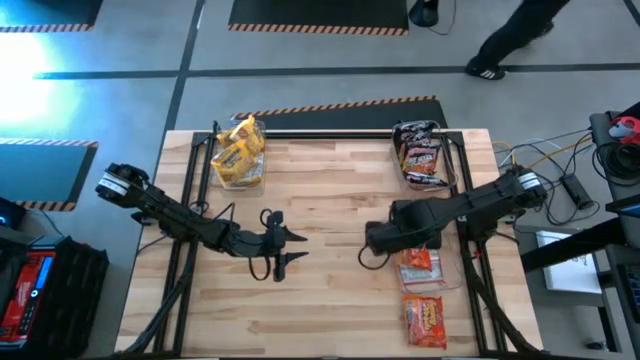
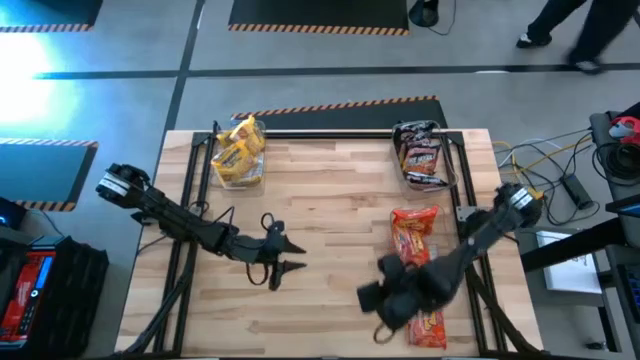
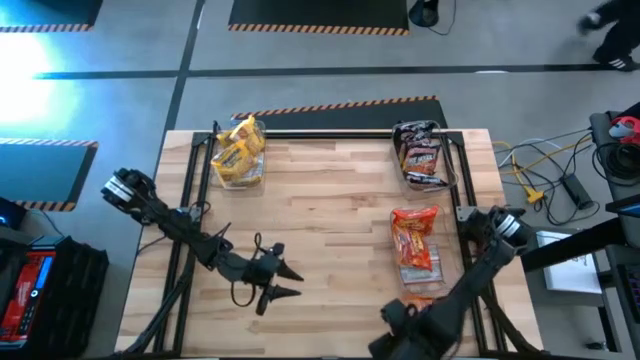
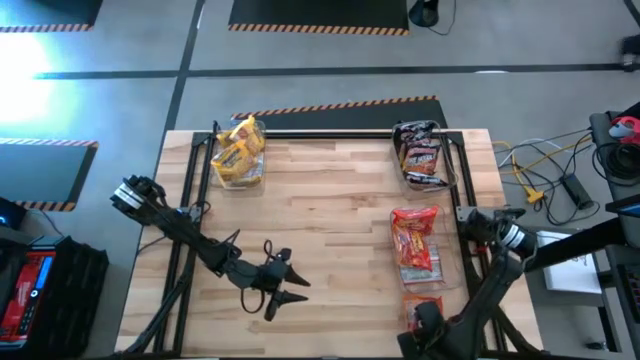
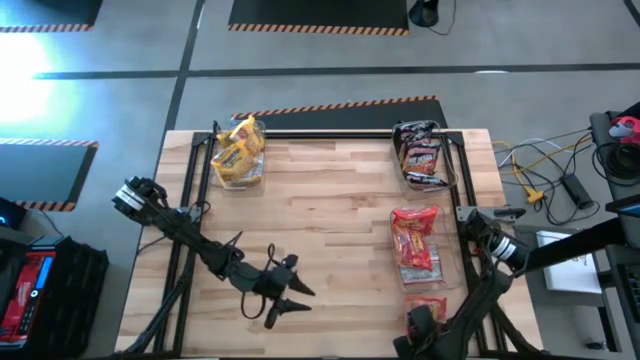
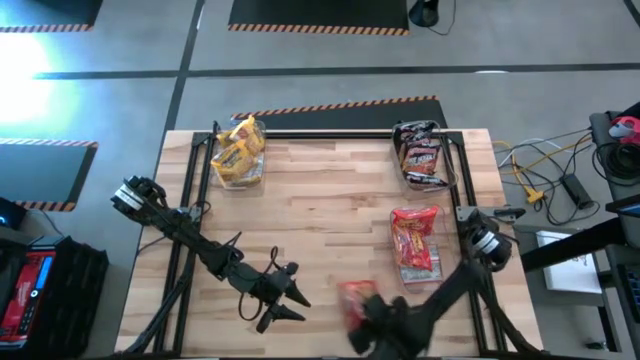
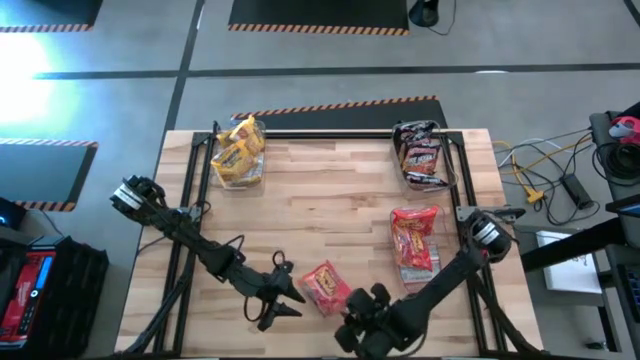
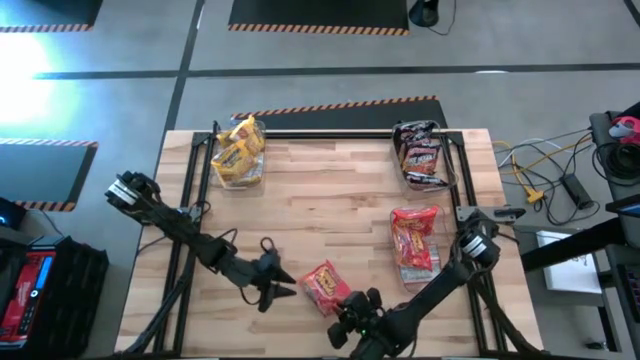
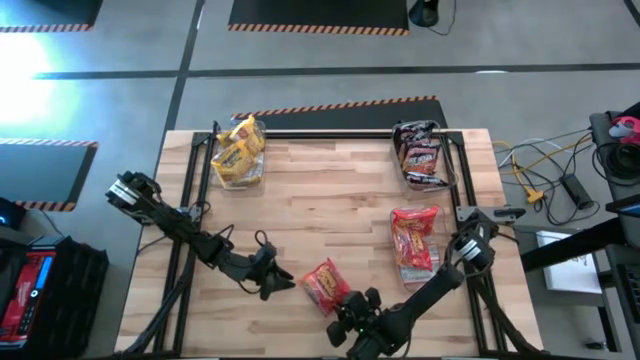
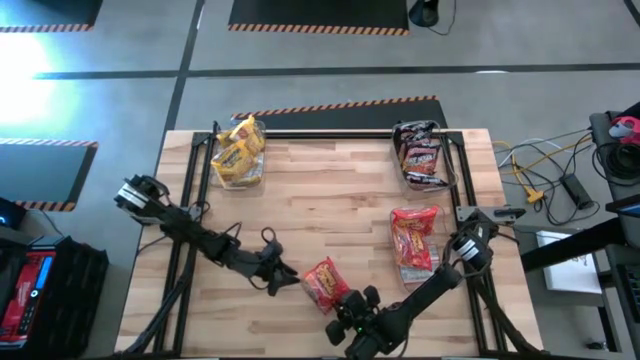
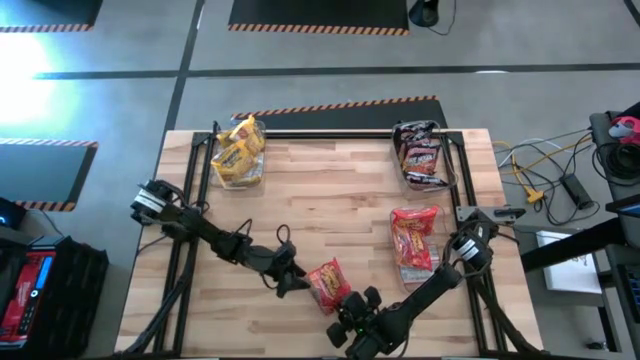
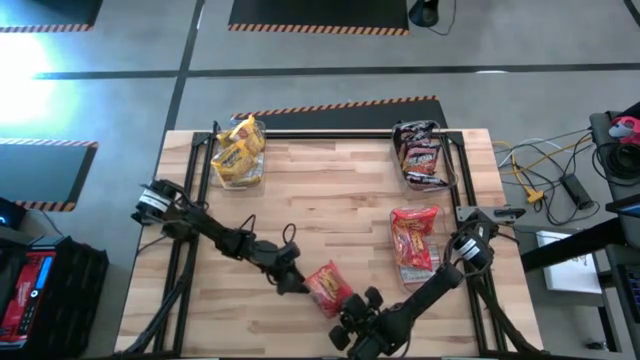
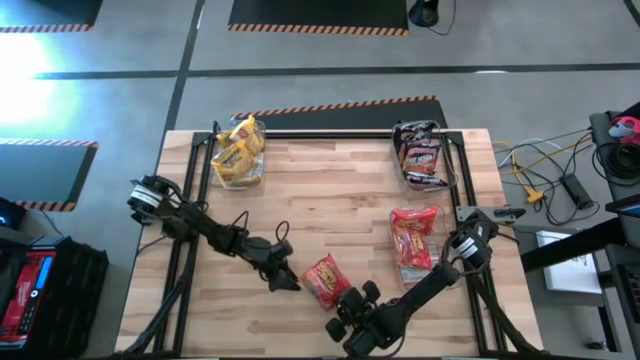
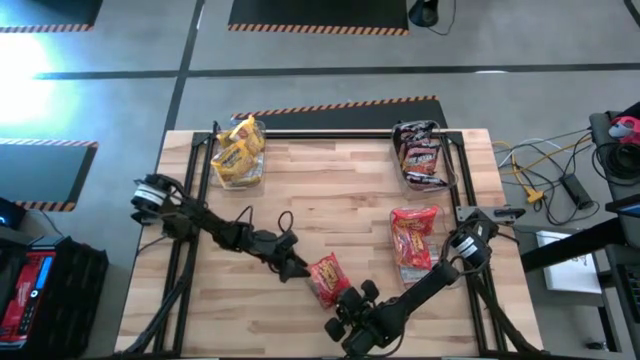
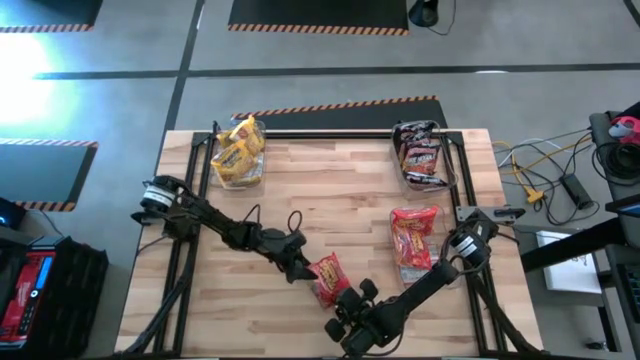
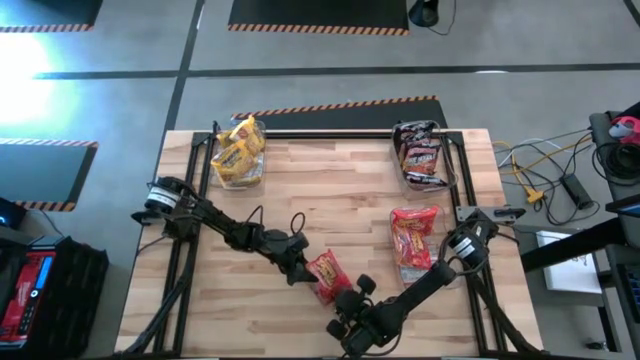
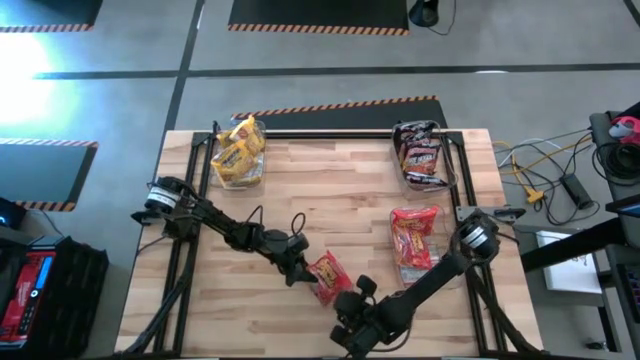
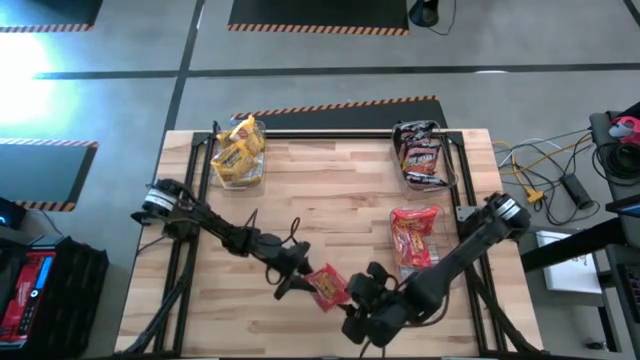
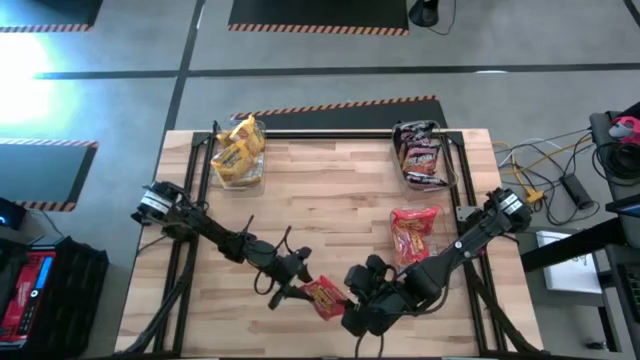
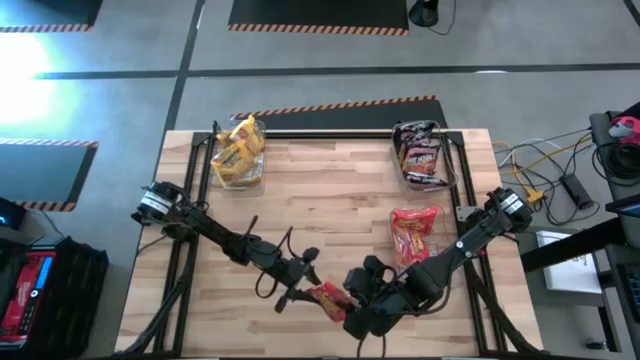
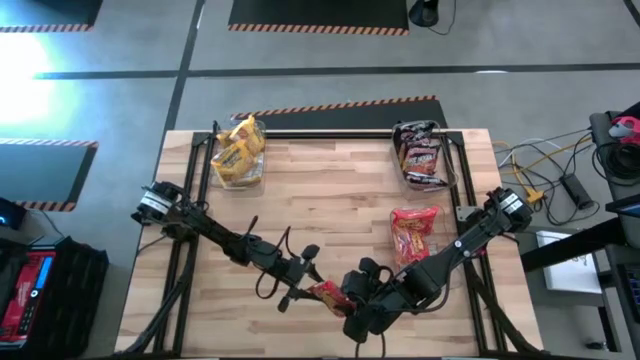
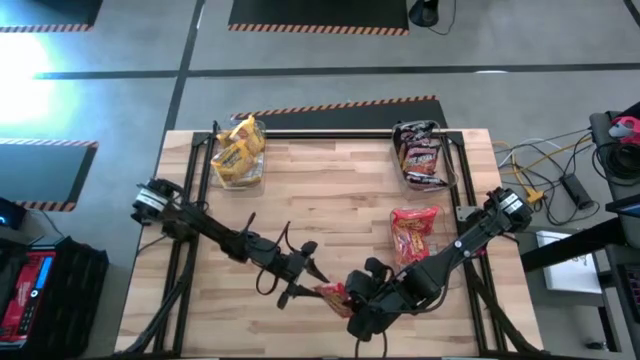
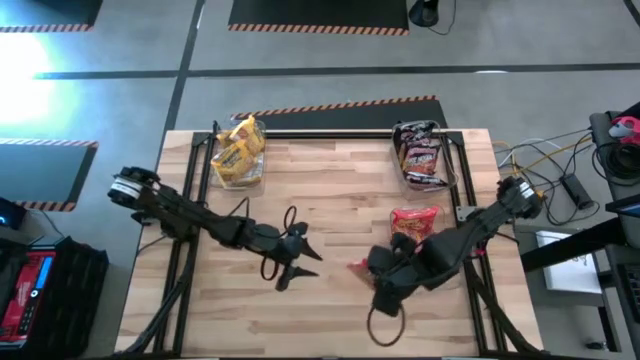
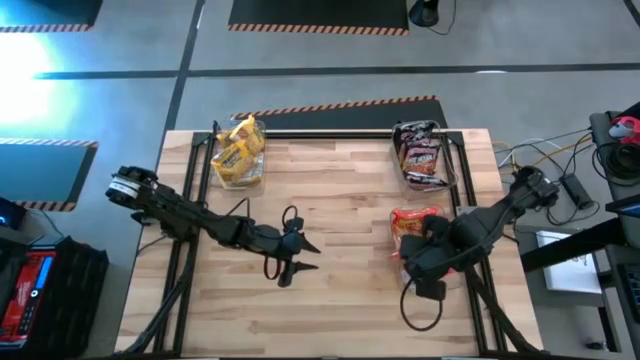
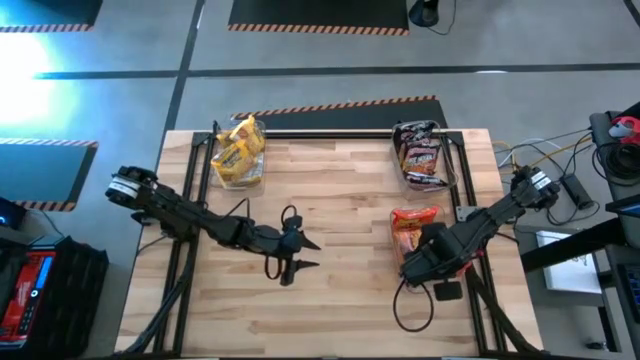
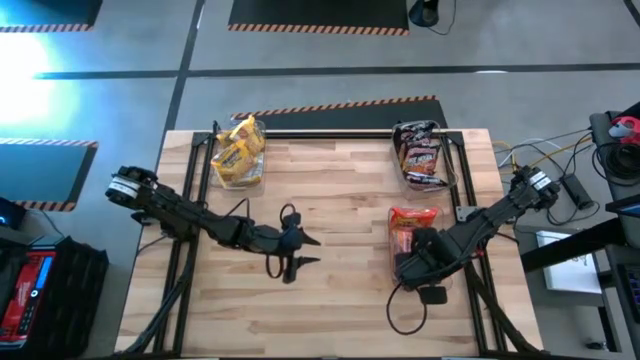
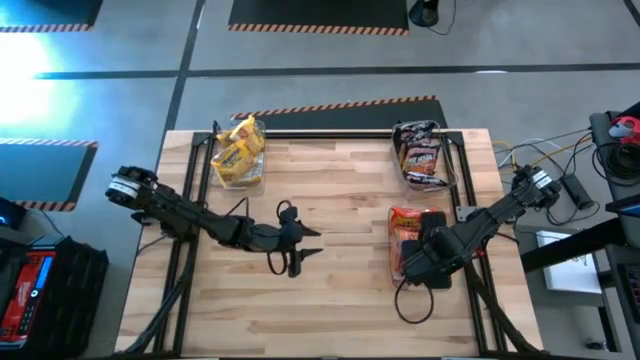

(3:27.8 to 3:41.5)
Task: Sort Maruchan noodles
Put the orange noodle pack into the bottom transparent bin

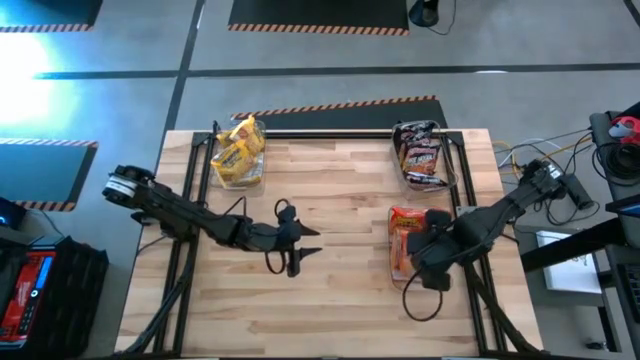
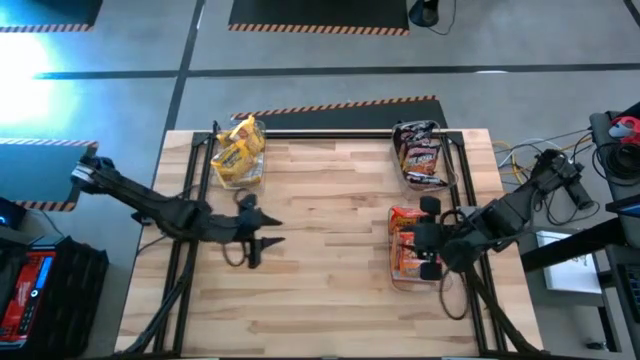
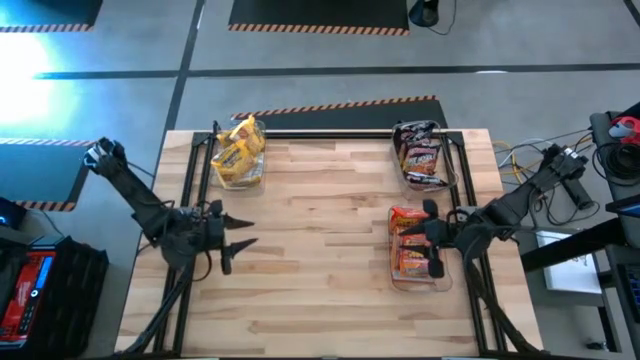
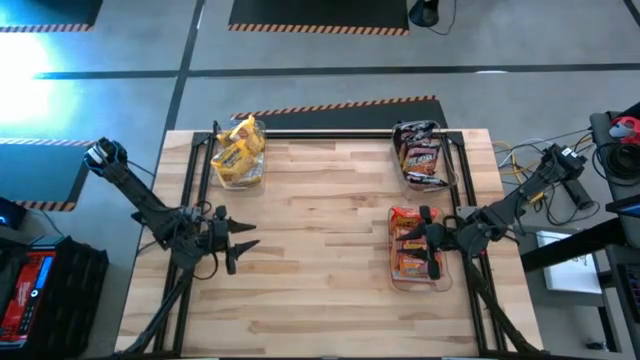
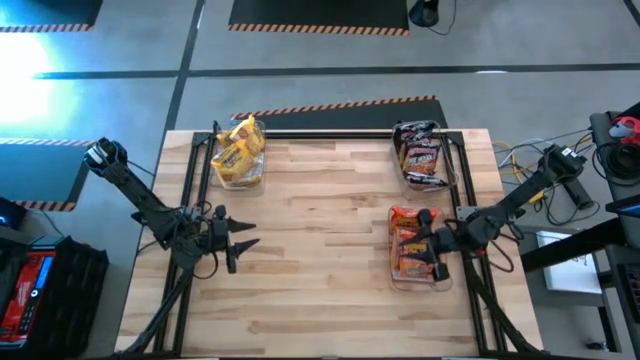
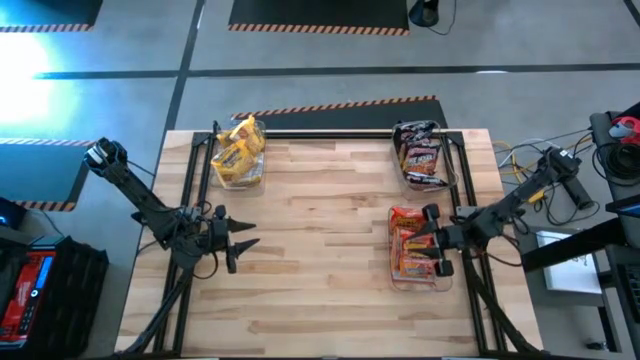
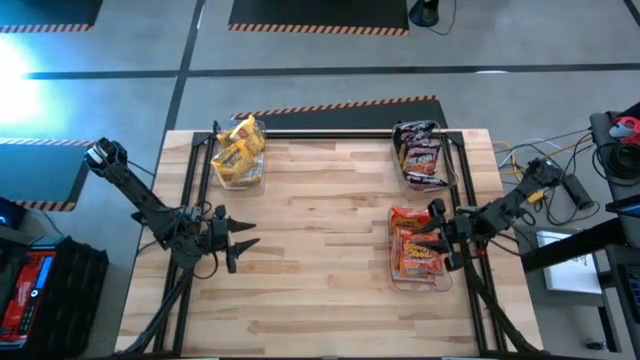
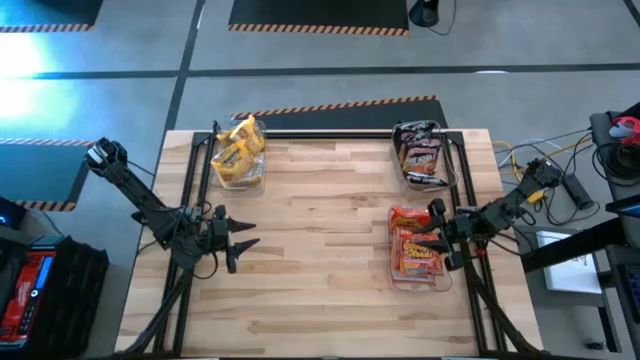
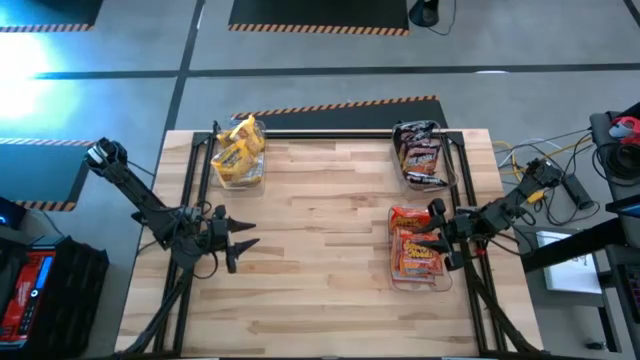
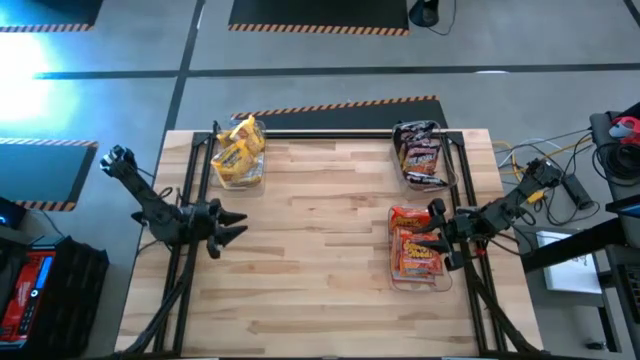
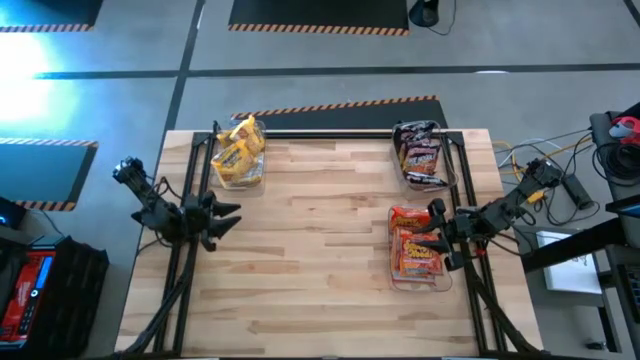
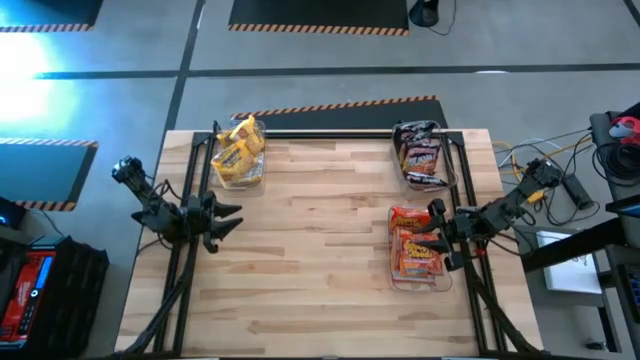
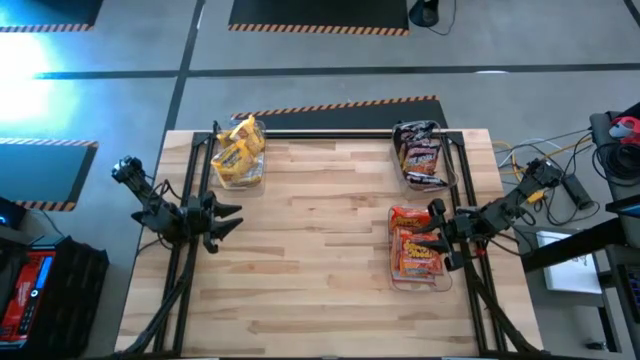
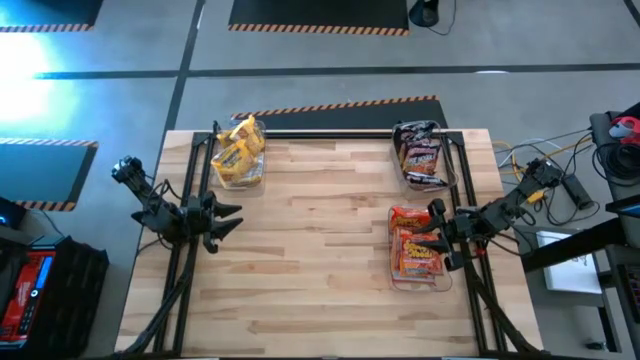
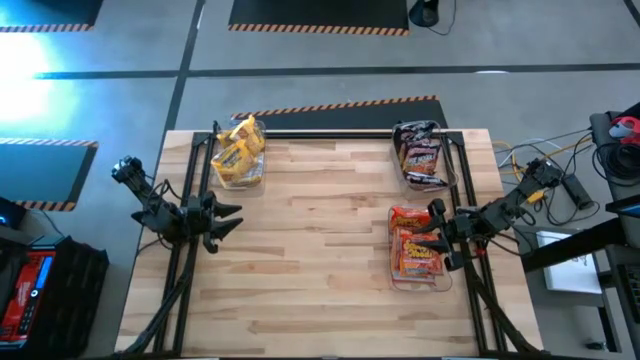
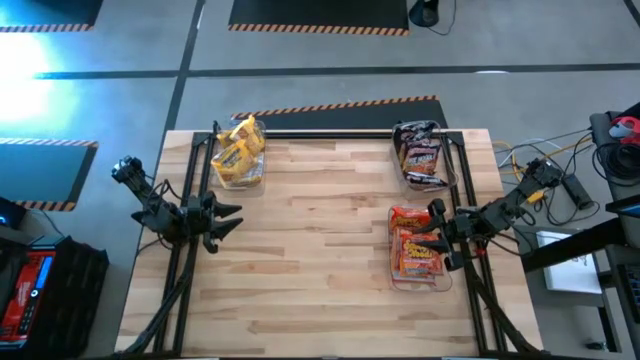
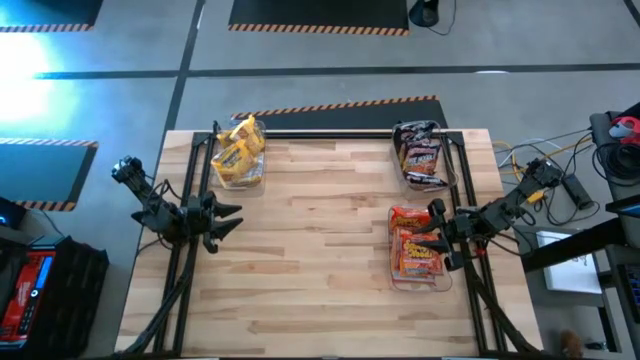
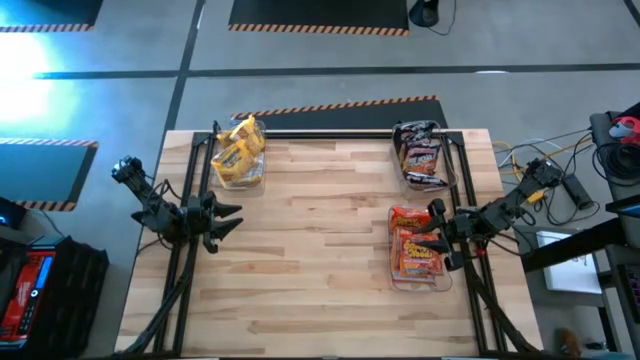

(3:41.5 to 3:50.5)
Return to Home Position
